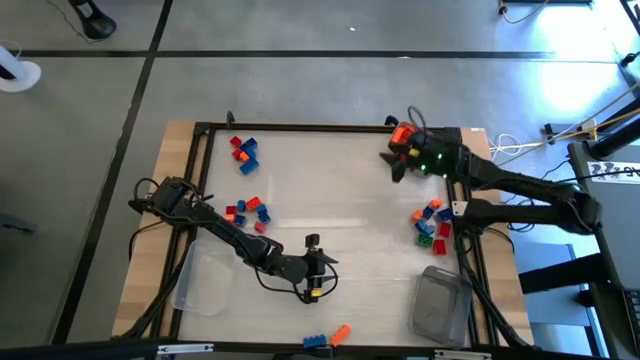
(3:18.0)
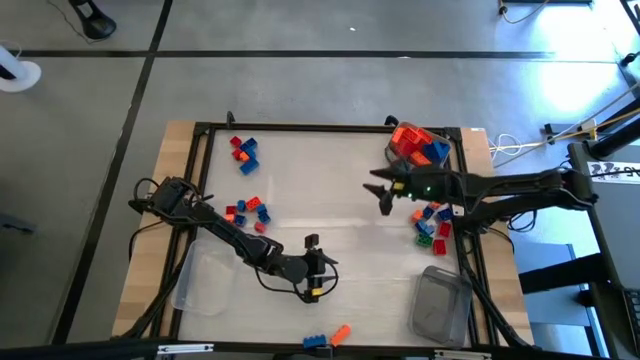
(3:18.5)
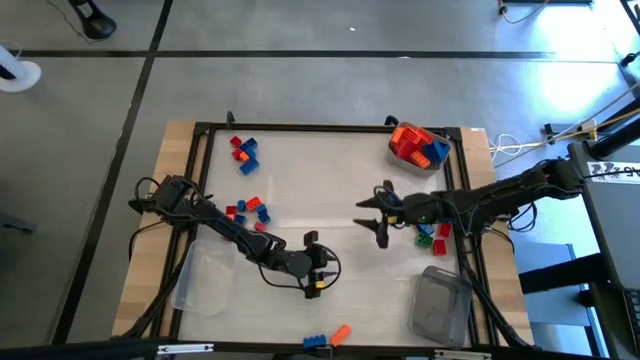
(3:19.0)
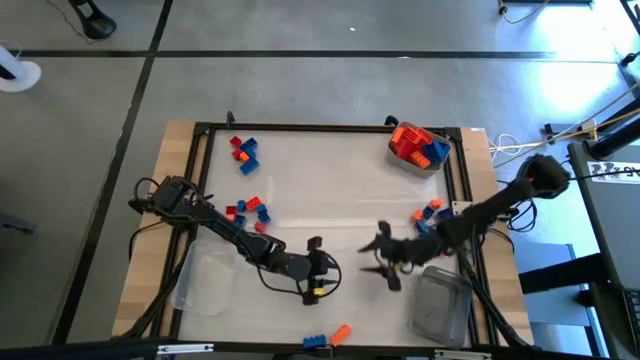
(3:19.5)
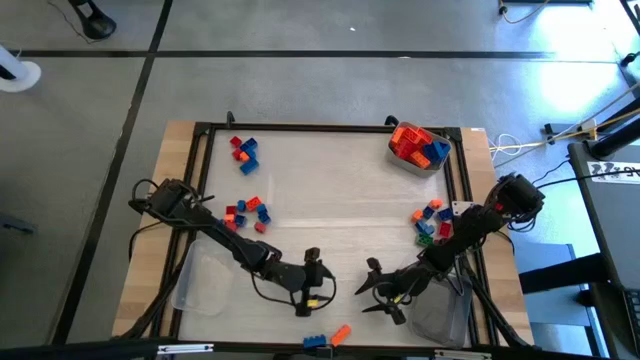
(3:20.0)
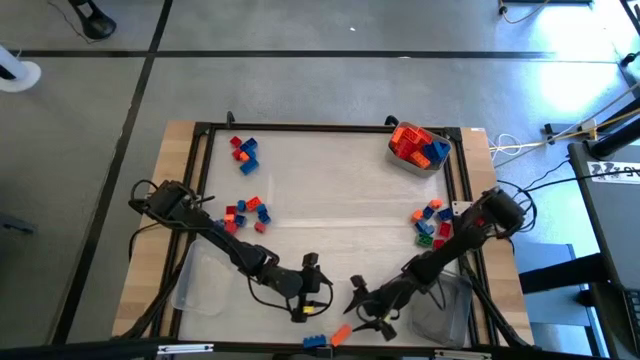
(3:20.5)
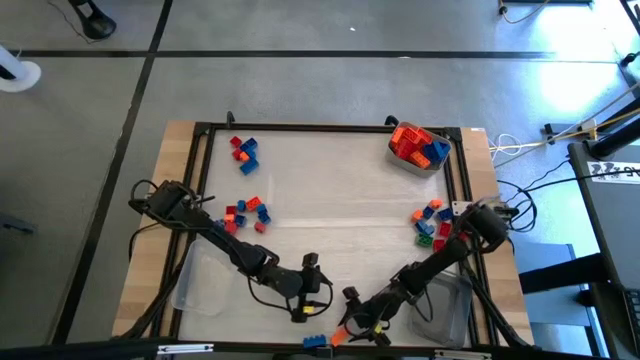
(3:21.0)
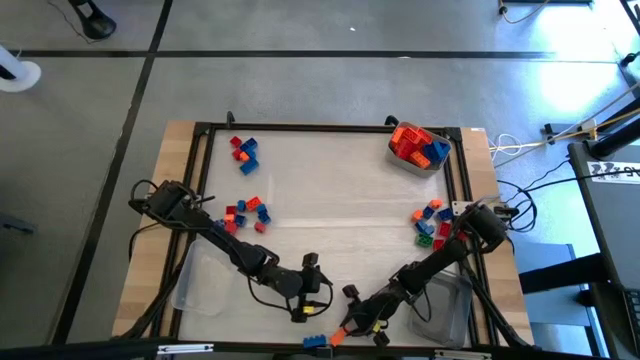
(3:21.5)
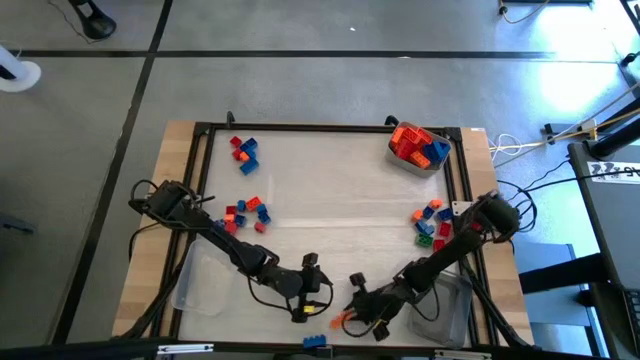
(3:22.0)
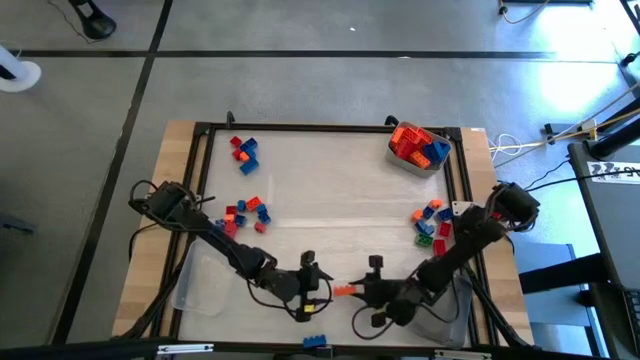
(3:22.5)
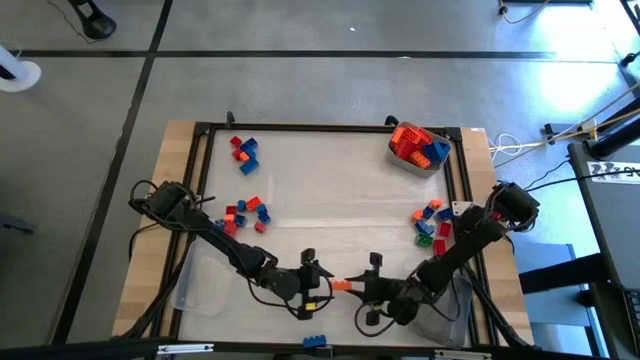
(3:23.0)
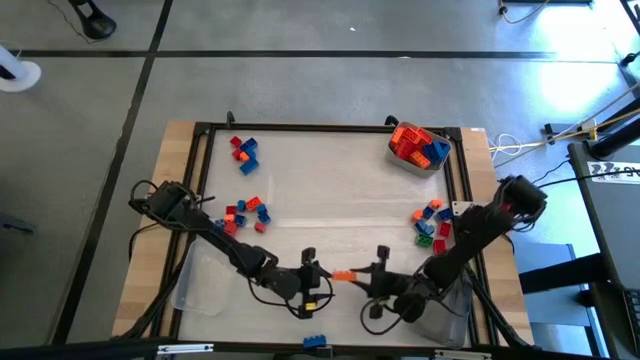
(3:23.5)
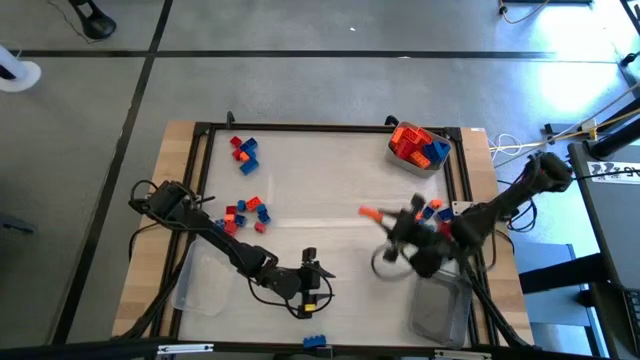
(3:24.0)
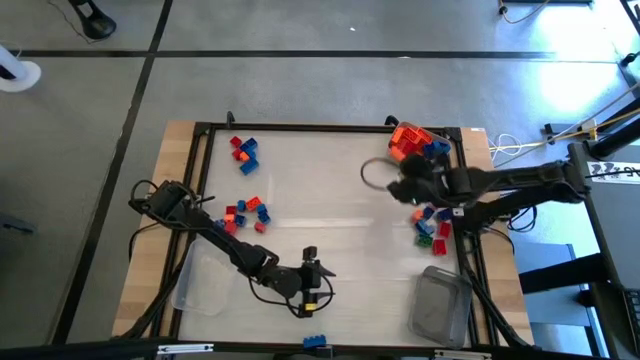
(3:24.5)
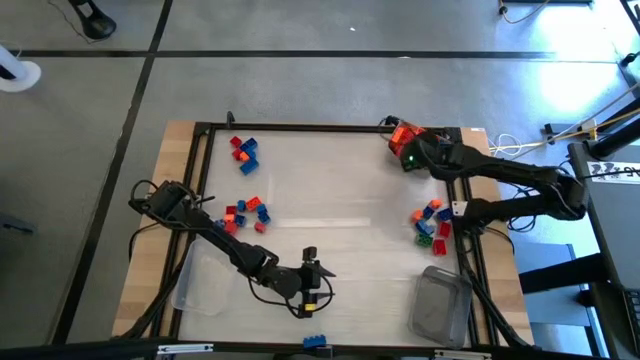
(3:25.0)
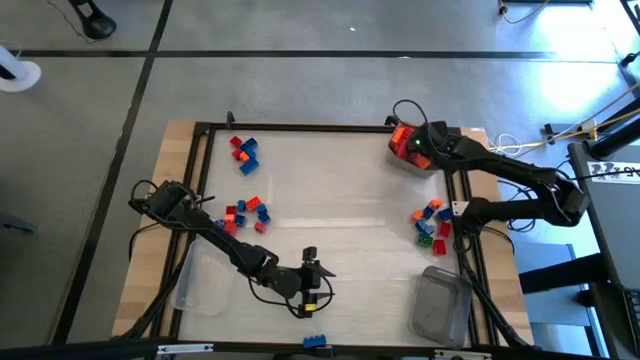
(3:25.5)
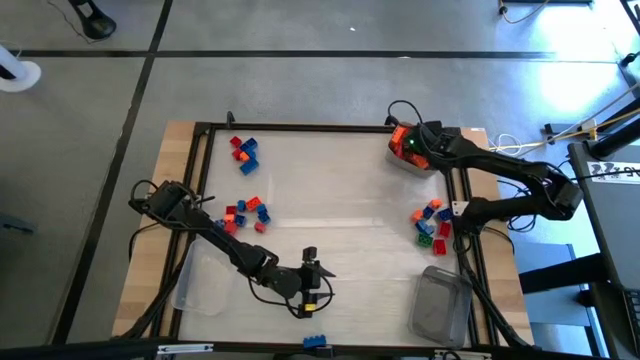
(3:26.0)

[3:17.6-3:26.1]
Task: Sort blocks by size
Put the orange game piece into the gray bin

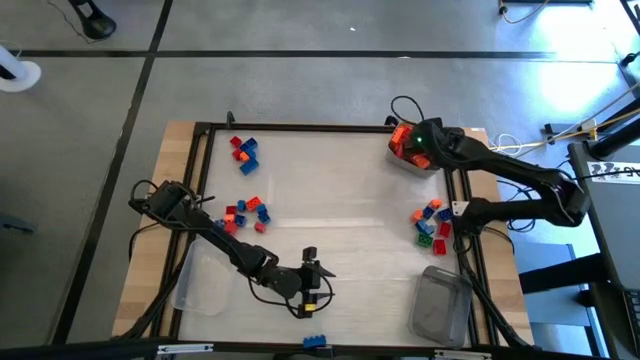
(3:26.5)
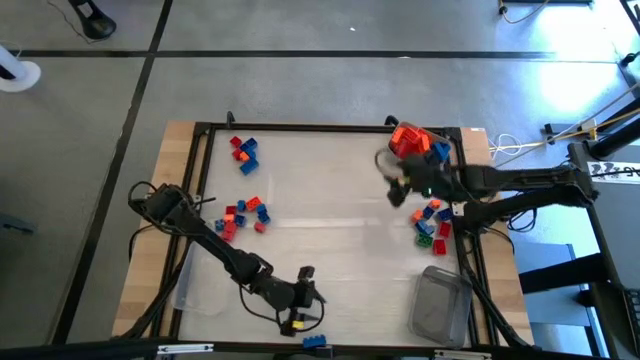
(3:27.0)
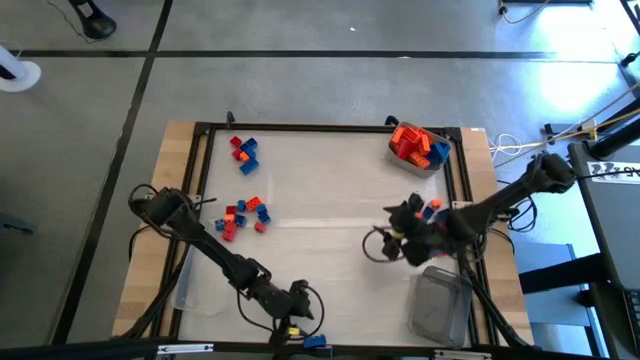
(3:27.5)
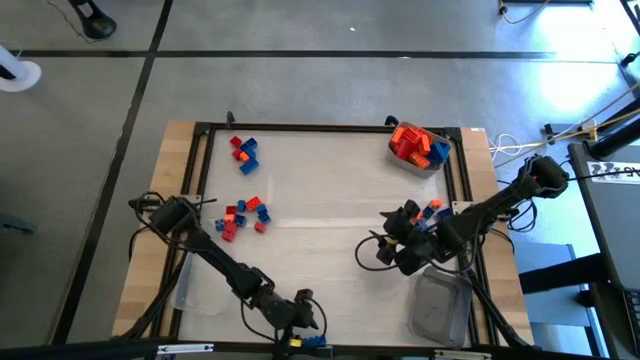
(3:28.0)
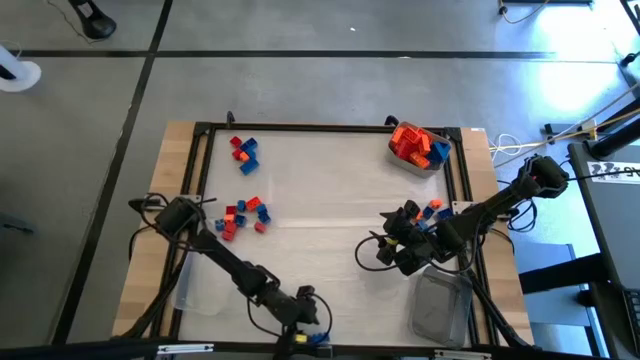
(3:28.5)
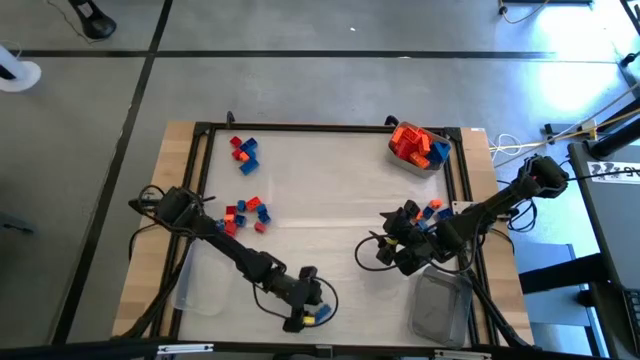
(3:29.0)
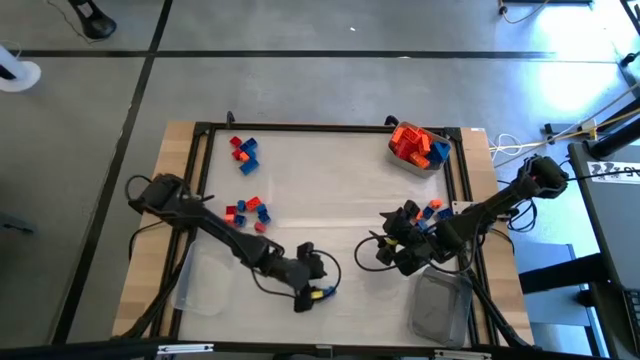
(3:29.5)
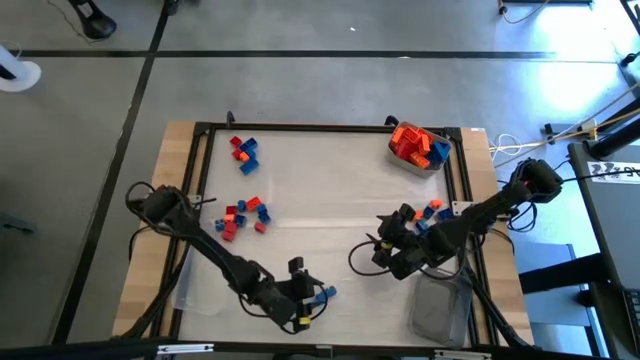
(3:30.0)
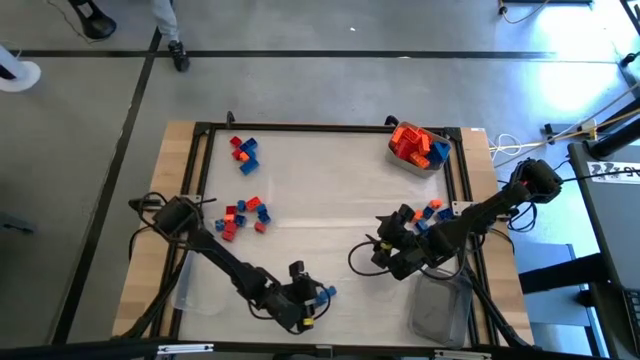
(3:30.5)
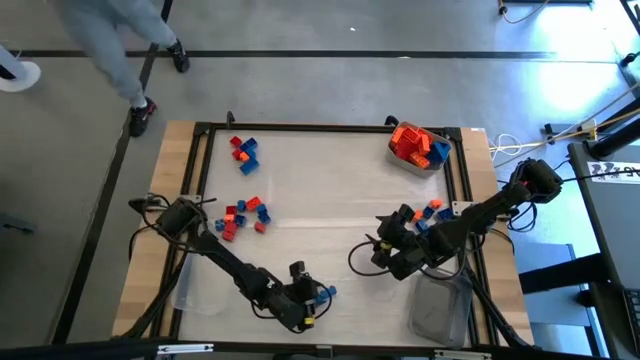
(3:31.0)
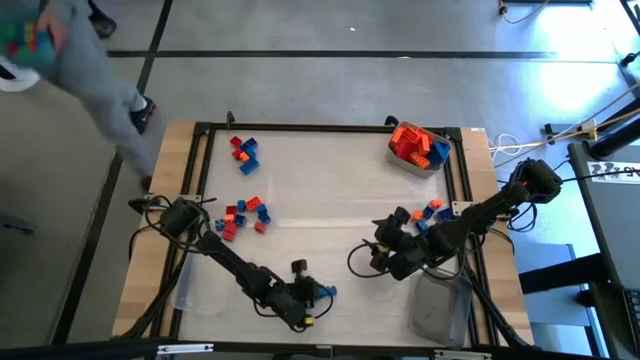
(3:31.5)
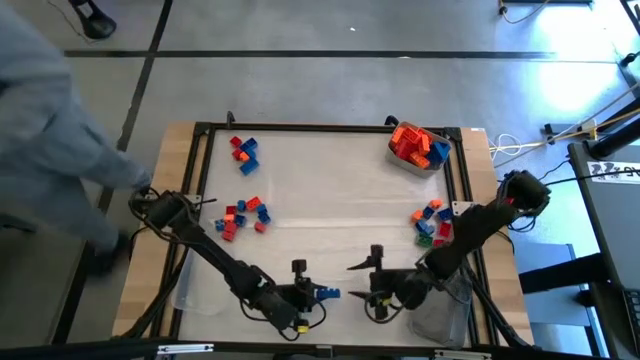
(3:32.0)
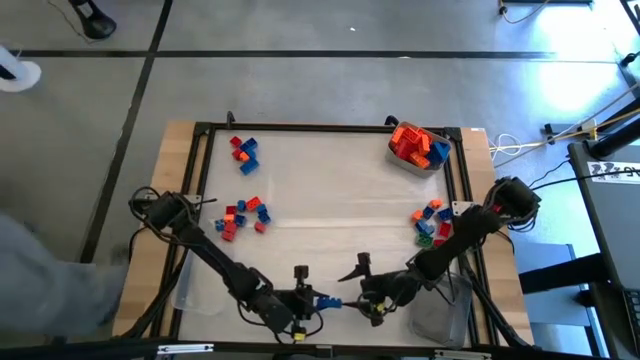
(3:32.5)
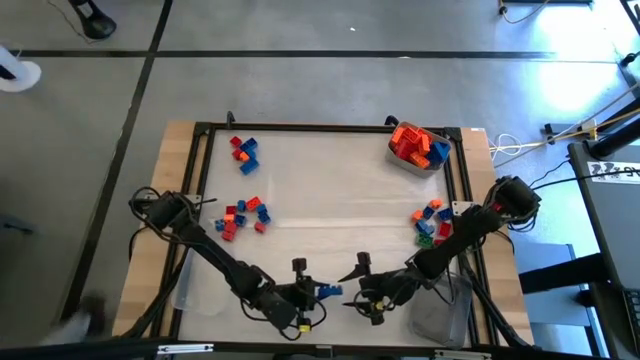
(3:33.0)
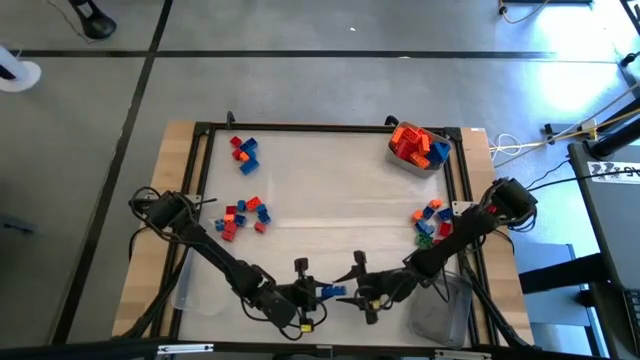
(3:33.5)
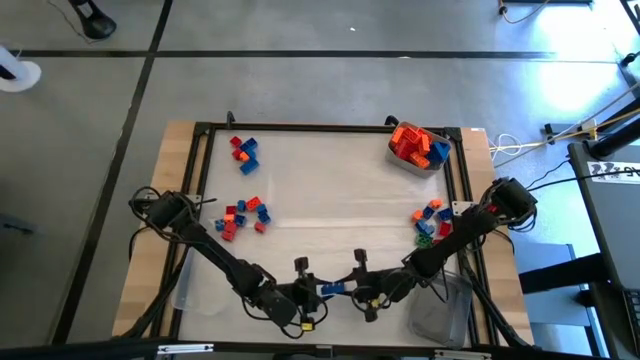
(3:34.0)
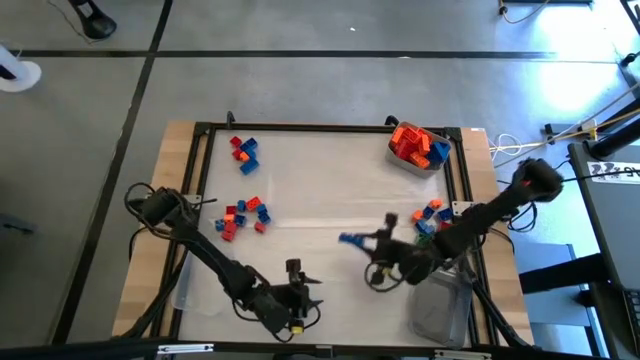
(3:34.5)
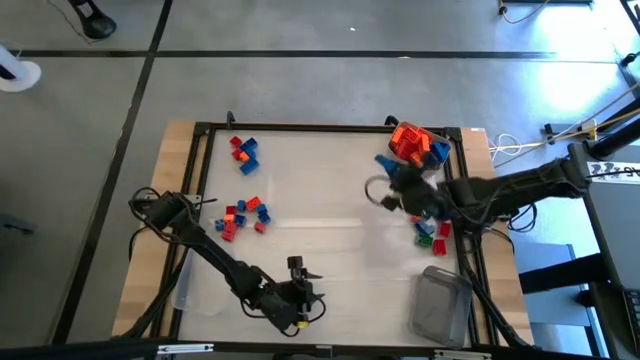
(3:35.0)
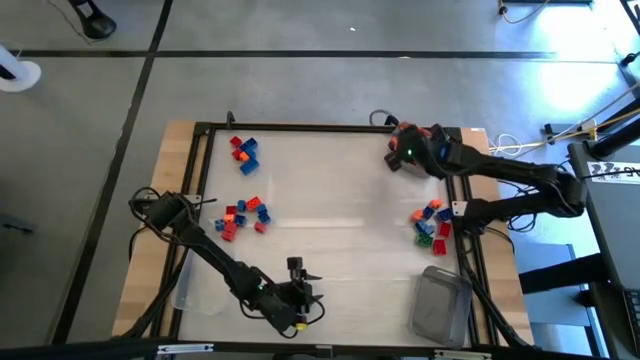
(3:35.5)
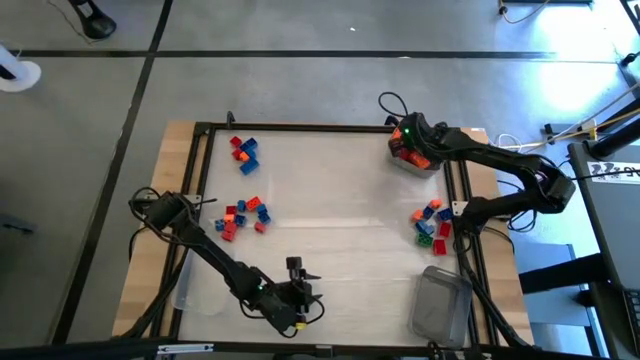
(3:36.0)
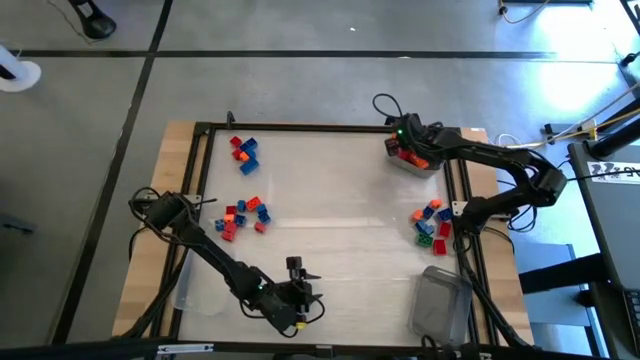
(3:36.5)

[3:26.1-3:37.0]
Put the blue game piece into the gray bin
